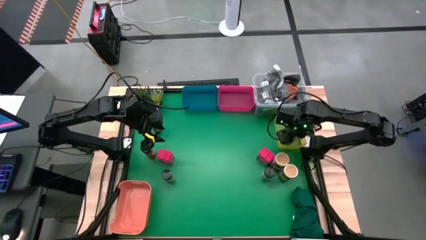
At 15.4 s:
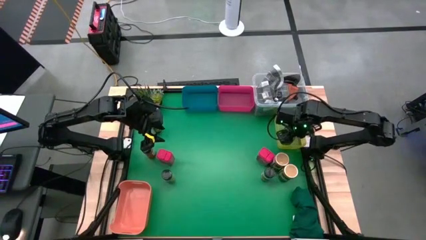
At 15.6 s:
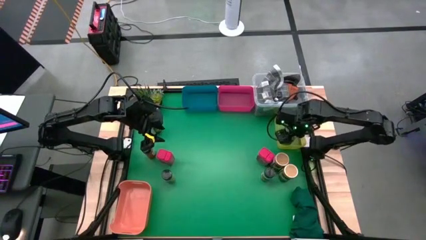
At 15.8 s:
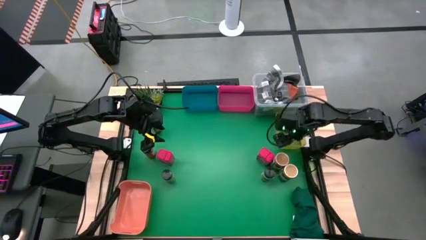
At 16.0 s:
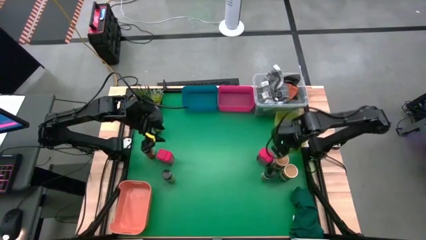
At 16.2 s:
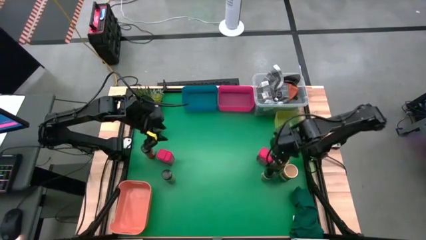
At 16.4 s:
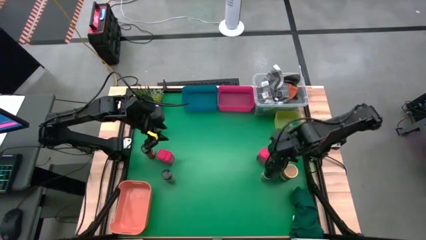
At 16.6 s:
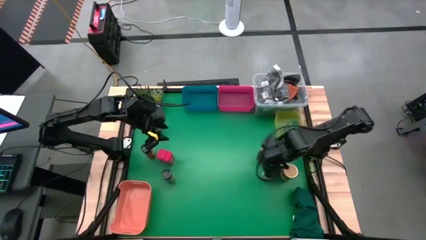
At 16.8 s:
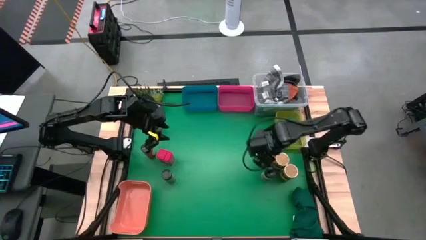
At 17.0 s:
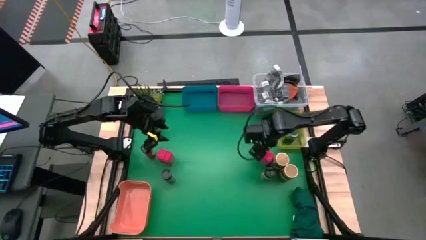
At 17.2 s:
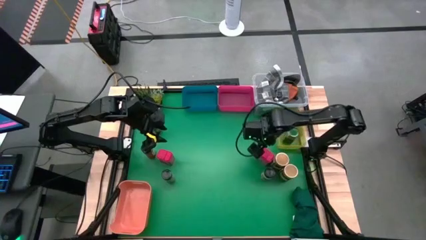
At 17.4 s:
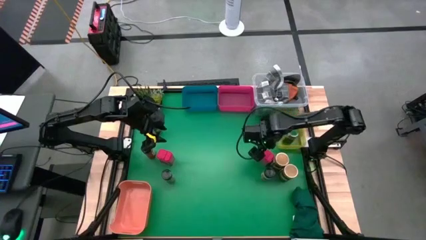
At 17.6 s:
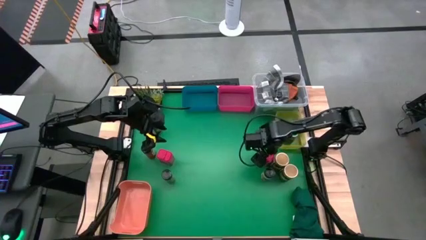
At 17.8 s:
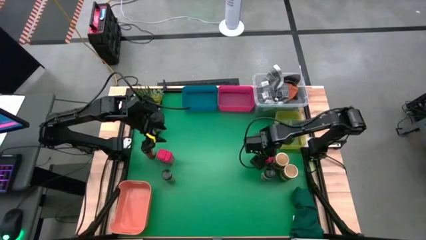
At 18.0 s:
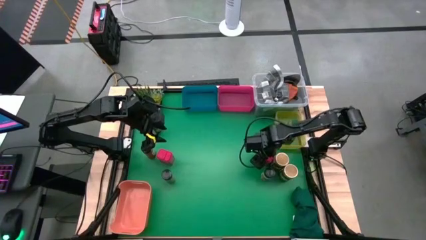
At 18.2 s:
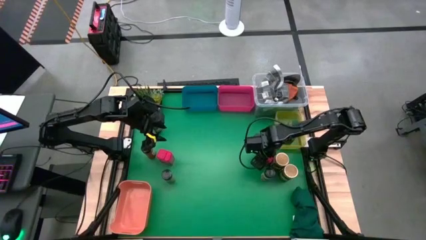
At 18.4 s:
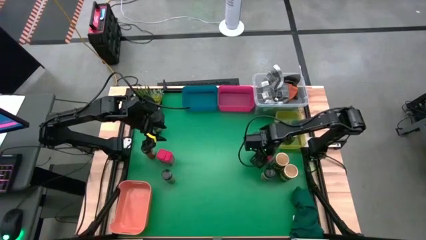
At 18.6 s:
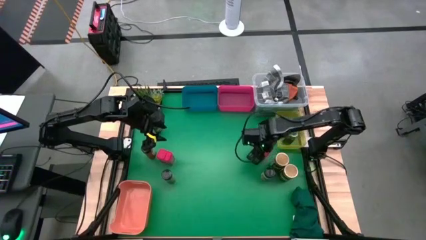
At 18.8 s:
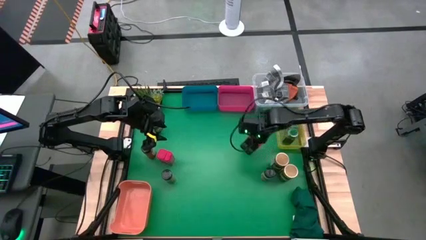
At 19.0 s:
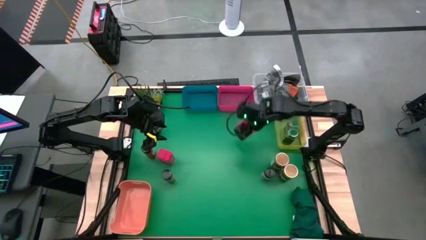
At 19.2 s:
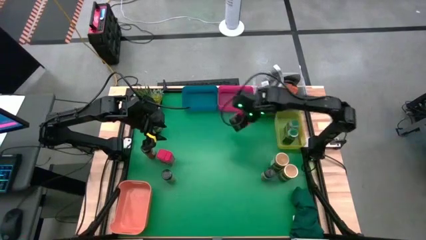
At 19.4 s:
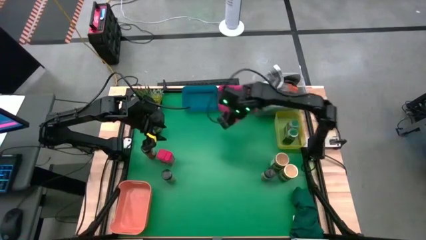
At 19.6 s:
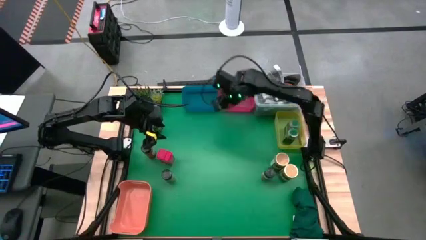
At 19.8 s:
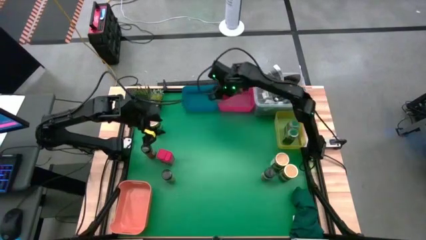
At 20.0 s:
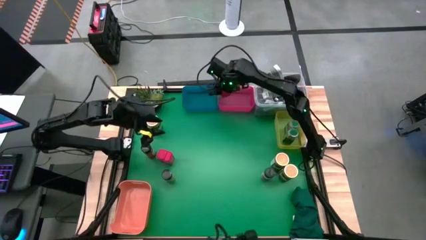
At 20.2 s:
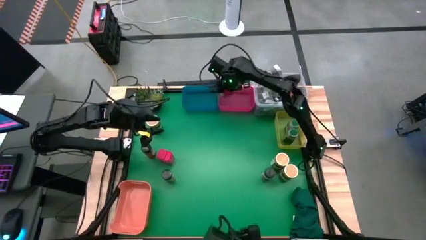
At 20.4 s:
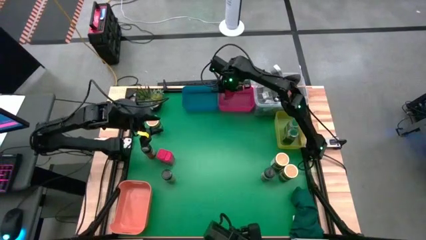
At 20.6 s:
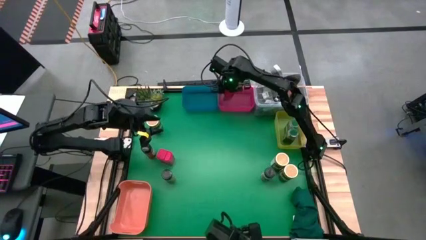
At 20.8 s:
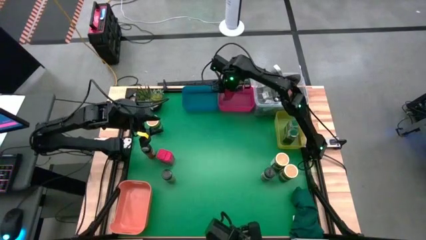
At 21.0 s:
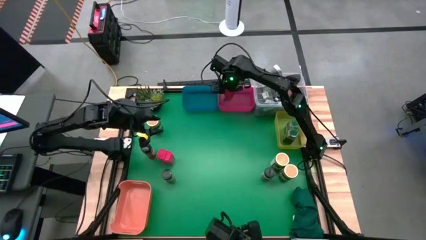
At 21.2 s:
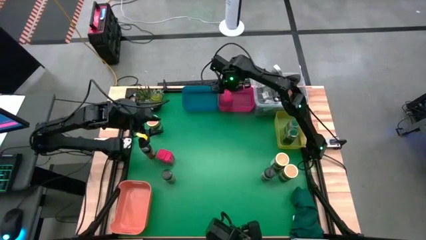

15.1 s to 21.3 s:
Task: Sort spices by type
Put the right red spice can into the red bin

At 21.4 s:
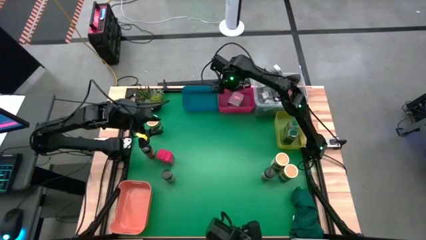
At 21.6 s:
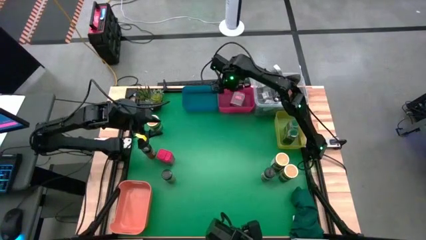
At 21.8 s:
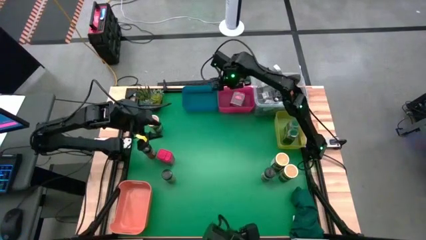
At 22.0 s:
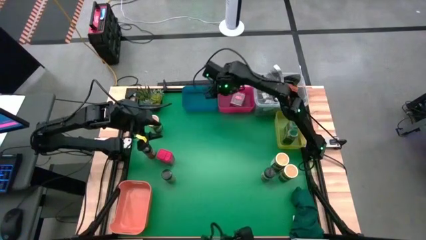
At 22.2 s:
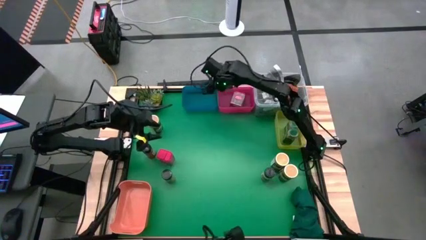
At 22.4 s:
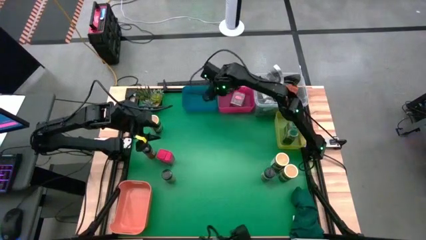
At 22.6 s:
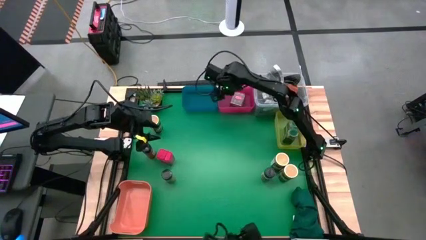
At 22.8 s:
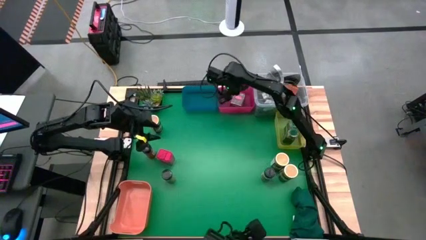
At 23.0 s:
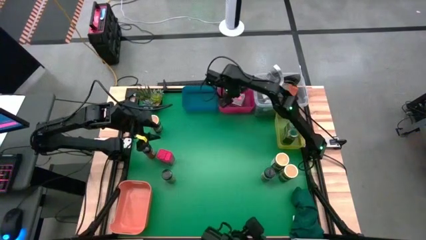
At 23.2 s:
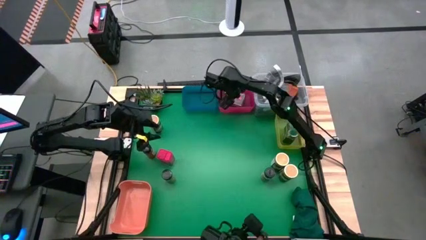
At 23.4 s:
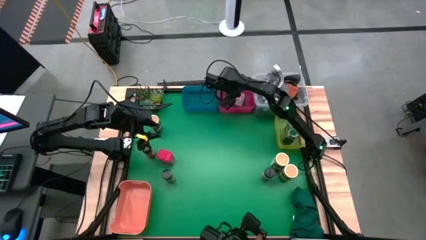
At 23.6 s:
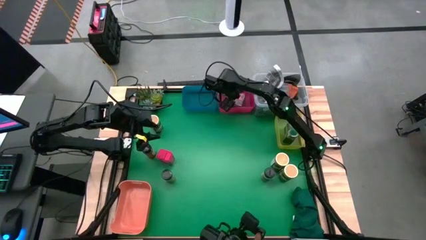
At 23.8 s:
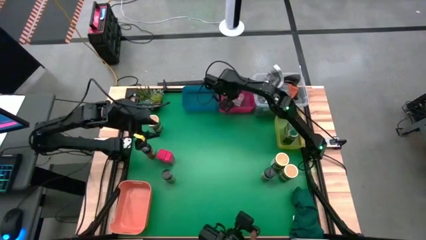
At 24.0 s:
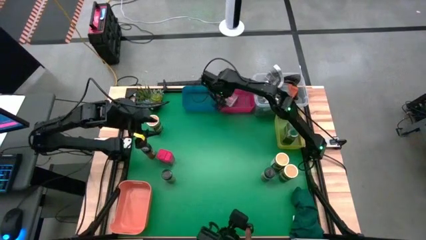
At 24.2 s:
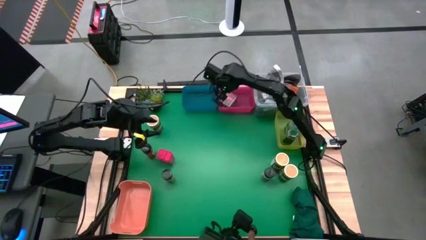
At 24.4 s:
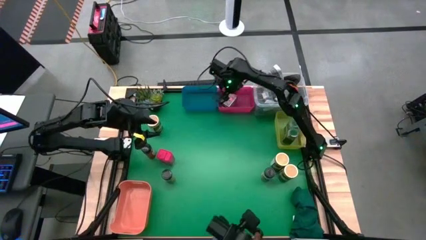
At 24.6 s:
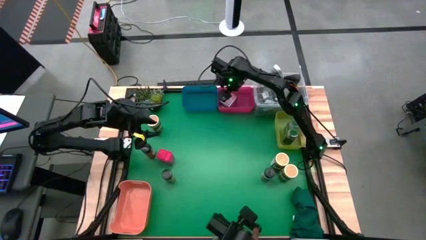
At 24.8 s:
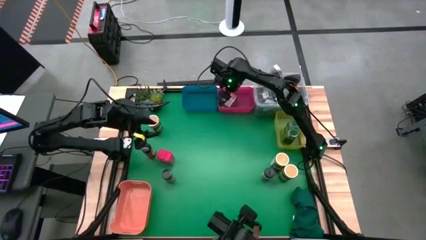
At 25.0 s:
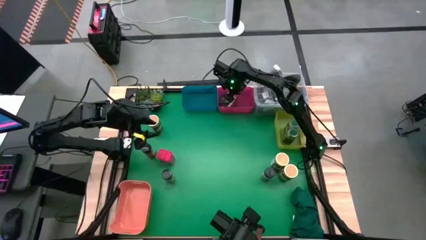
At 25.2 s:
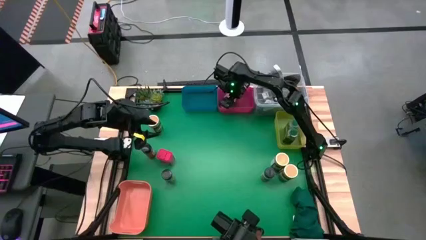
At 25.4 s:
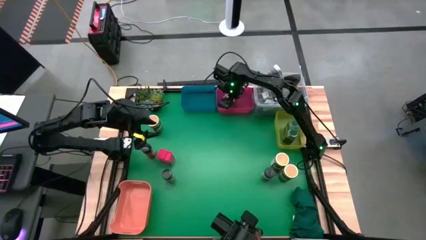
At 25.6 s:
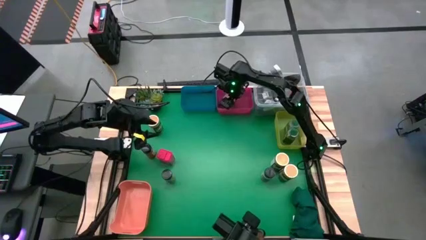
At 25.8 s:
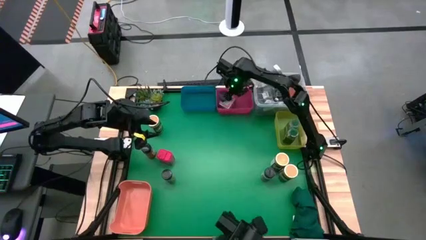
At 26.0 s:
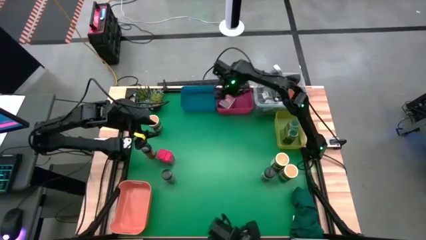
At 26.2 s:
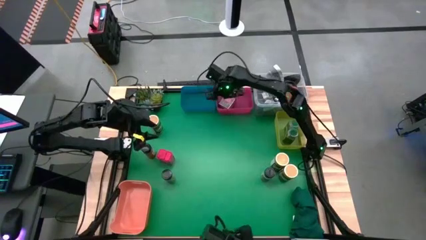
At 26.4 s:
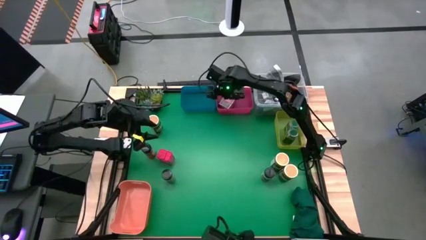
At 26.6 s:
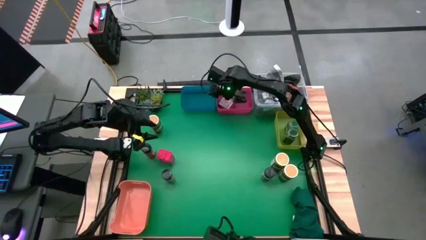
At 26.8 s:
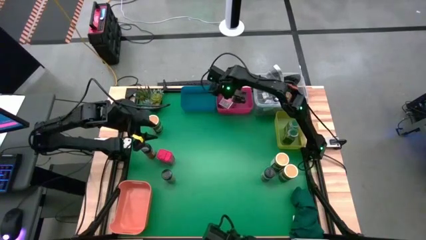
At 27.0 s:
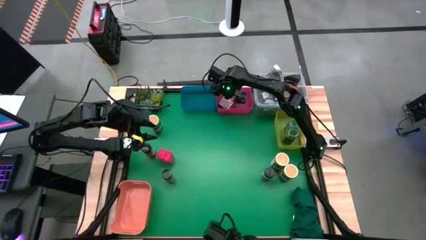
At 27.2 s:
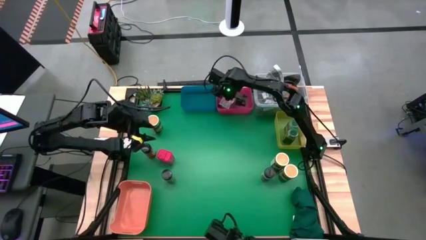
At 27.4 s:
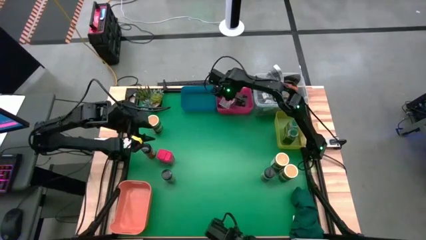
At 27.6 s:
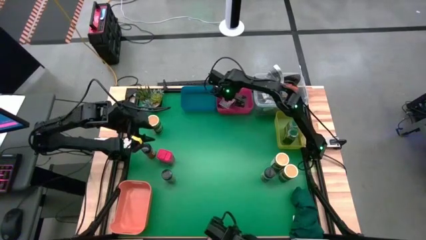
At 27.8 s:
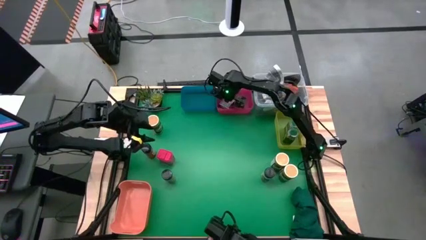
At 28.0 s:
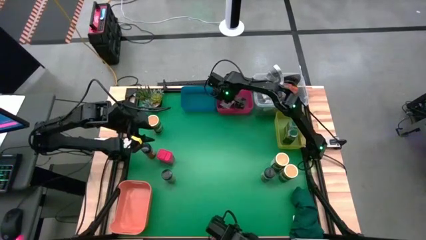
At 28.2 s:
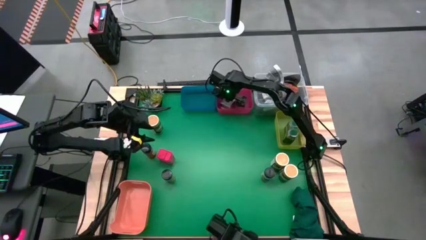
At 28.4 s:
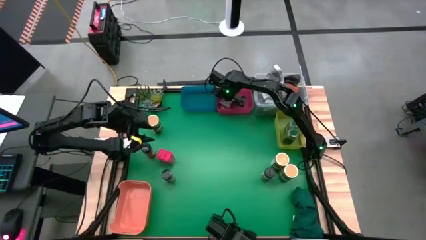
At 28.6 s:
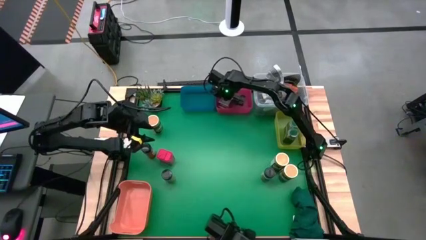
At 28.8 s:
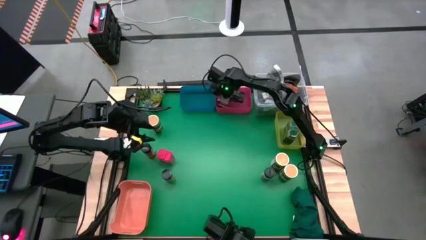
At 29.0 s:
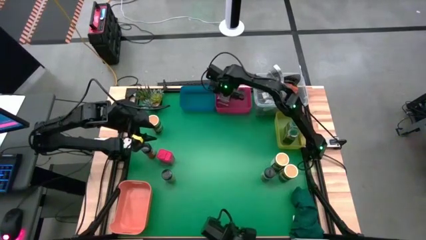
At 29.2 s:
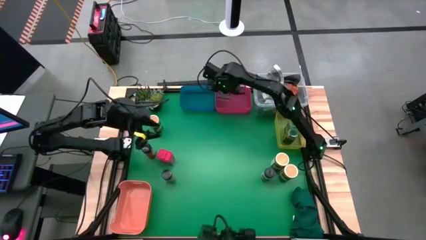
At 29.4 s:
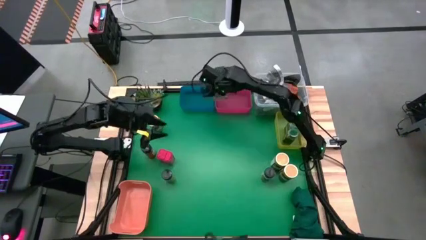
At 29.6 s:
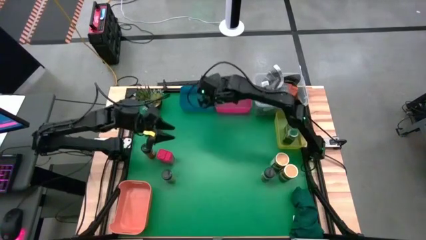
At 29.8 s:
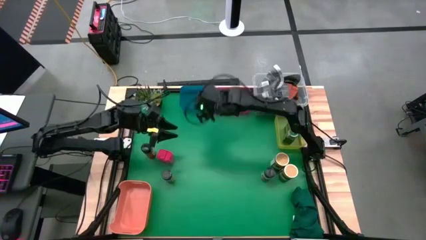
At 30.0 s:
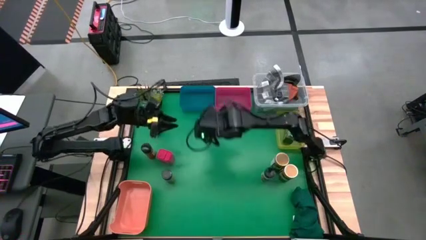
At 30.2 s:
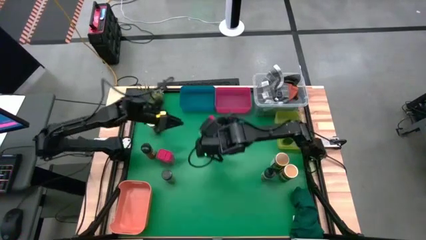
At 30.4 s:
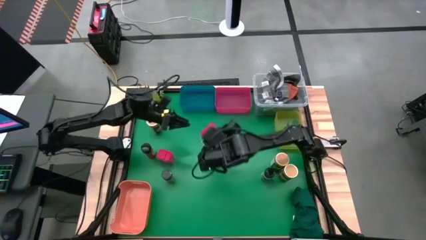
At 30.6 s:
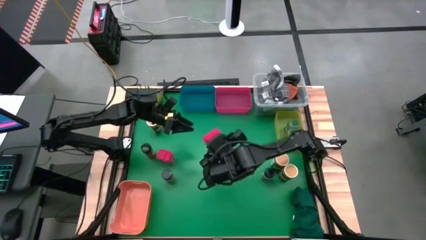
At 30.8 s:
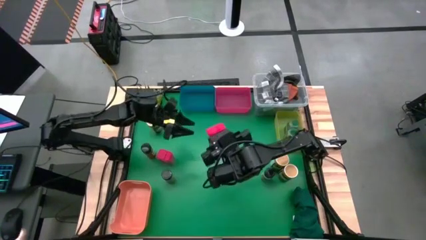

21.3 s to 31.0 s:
Put the right red spice can into the red bin
